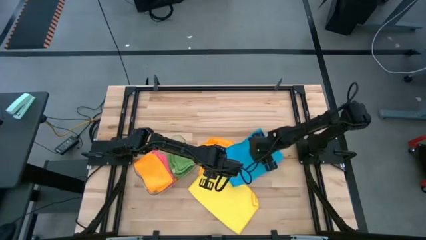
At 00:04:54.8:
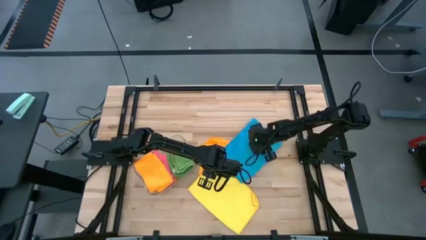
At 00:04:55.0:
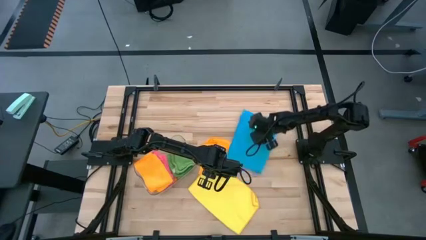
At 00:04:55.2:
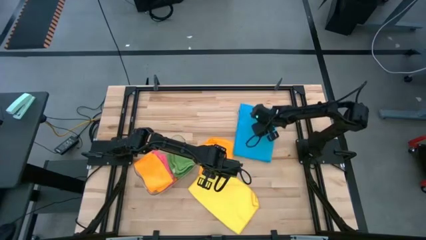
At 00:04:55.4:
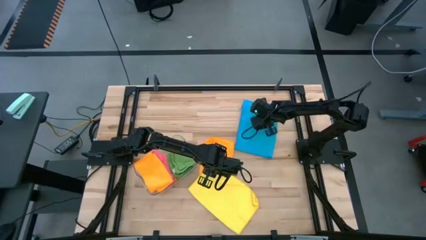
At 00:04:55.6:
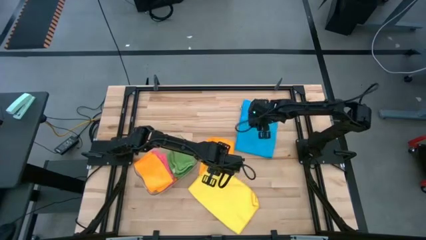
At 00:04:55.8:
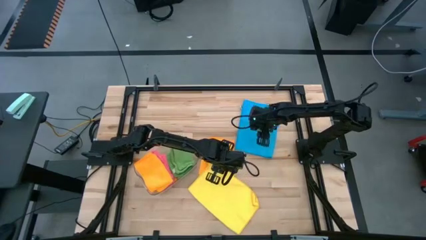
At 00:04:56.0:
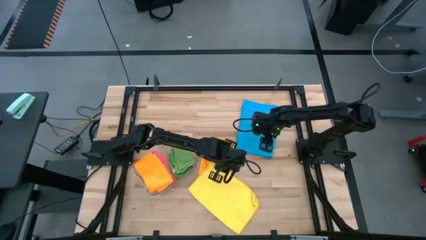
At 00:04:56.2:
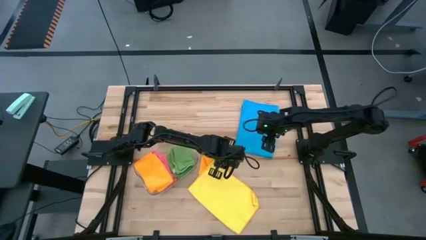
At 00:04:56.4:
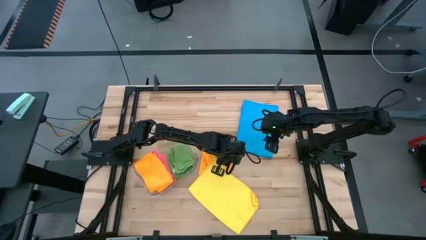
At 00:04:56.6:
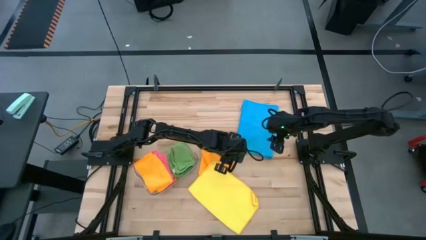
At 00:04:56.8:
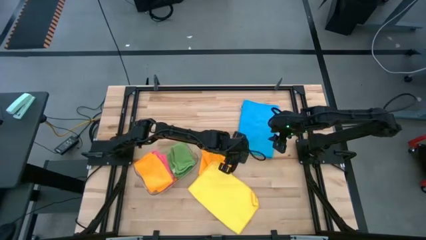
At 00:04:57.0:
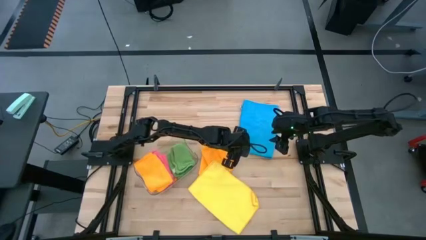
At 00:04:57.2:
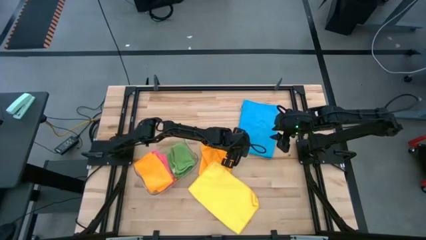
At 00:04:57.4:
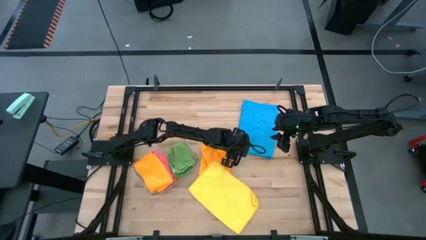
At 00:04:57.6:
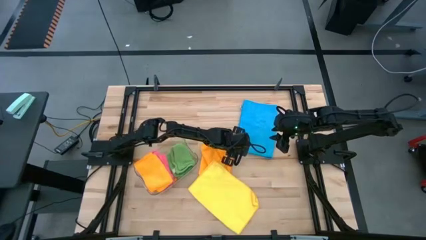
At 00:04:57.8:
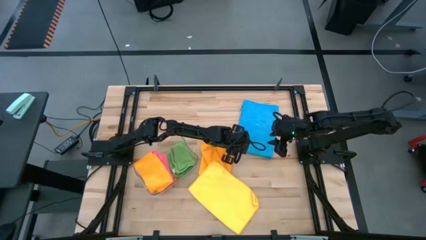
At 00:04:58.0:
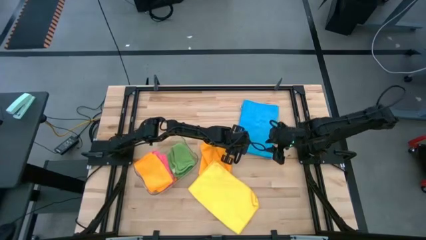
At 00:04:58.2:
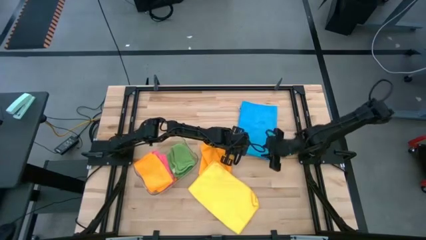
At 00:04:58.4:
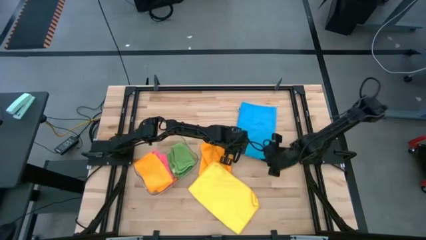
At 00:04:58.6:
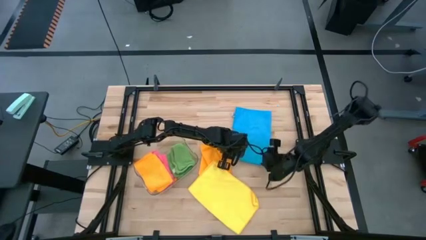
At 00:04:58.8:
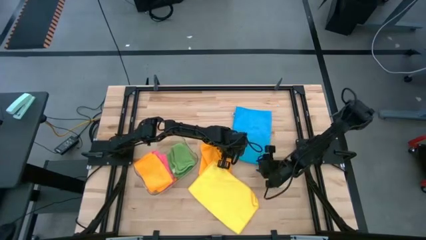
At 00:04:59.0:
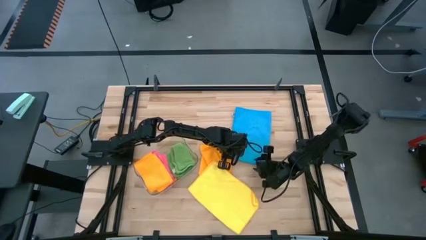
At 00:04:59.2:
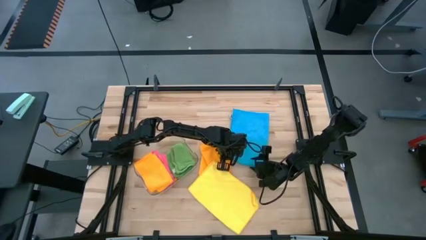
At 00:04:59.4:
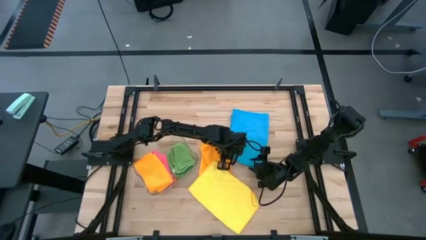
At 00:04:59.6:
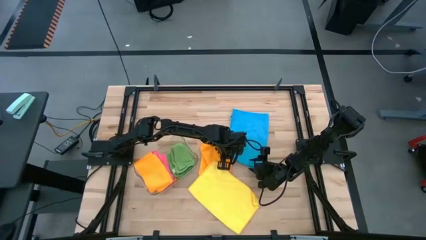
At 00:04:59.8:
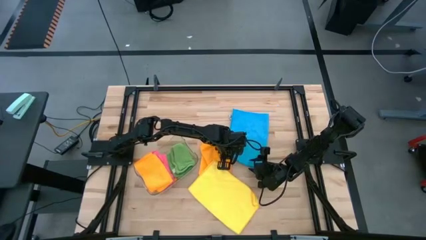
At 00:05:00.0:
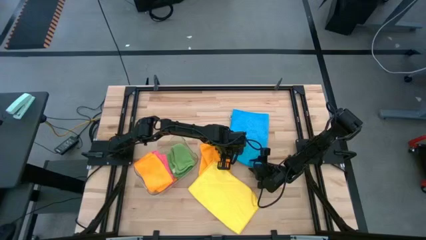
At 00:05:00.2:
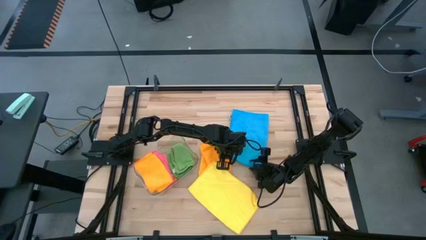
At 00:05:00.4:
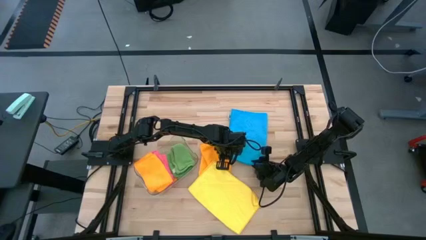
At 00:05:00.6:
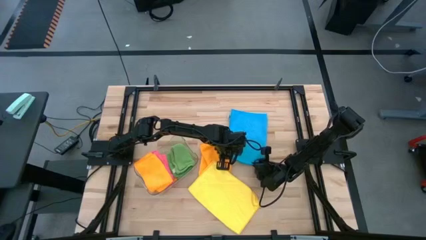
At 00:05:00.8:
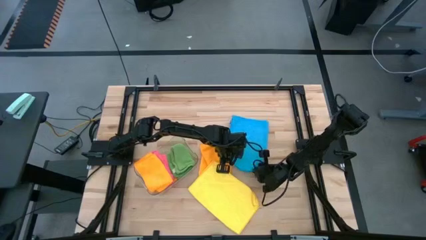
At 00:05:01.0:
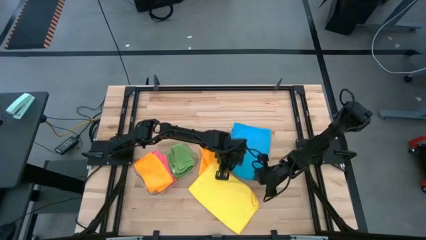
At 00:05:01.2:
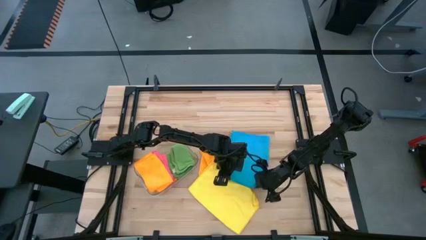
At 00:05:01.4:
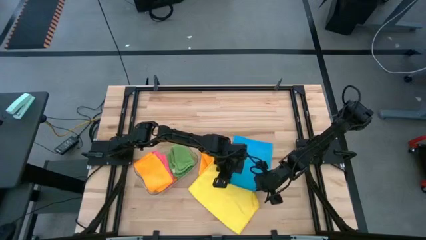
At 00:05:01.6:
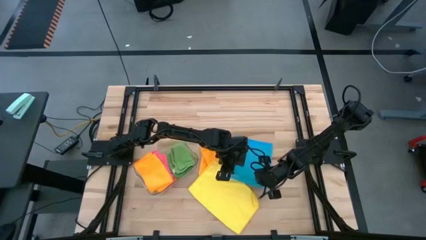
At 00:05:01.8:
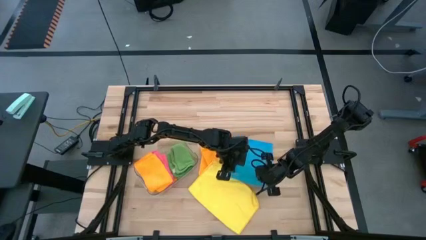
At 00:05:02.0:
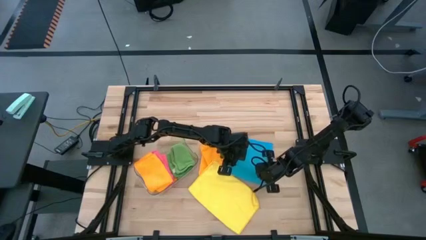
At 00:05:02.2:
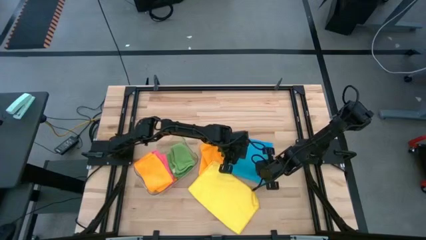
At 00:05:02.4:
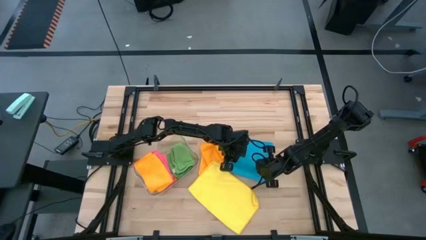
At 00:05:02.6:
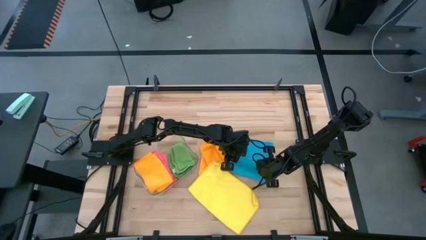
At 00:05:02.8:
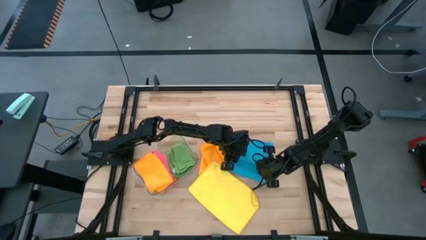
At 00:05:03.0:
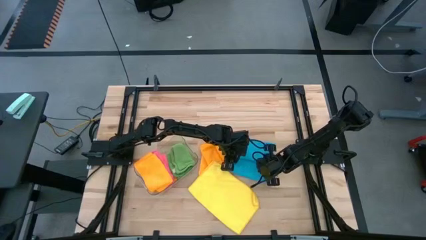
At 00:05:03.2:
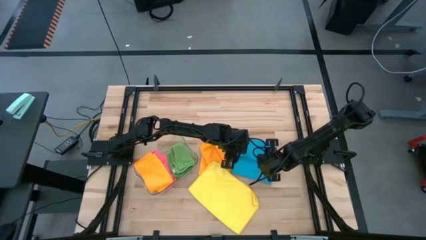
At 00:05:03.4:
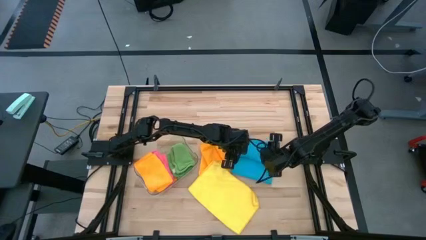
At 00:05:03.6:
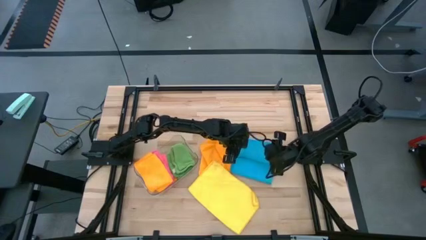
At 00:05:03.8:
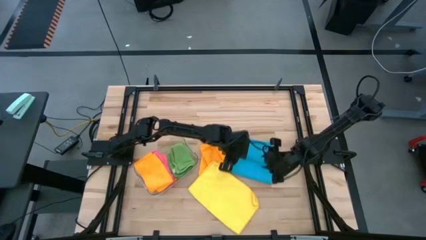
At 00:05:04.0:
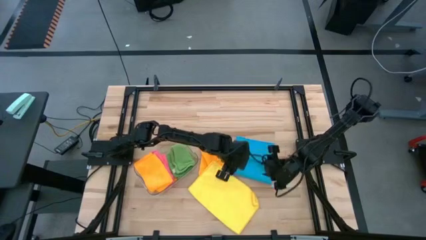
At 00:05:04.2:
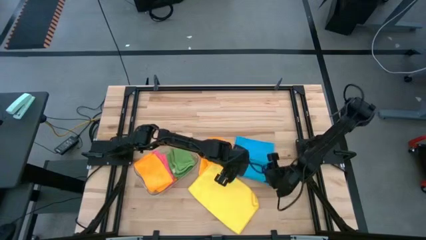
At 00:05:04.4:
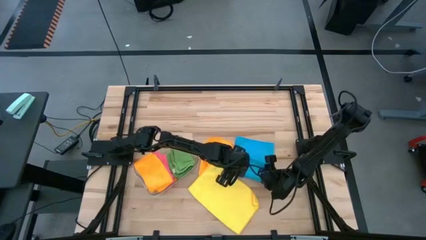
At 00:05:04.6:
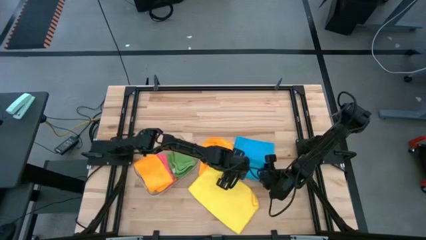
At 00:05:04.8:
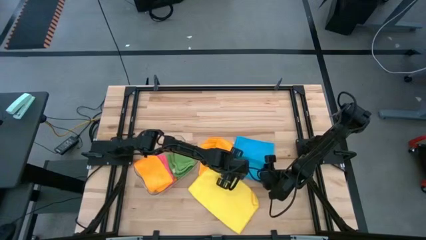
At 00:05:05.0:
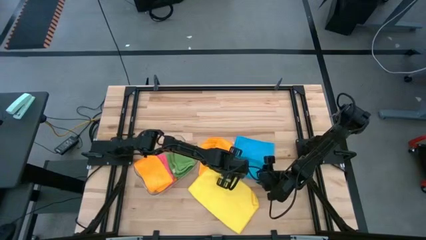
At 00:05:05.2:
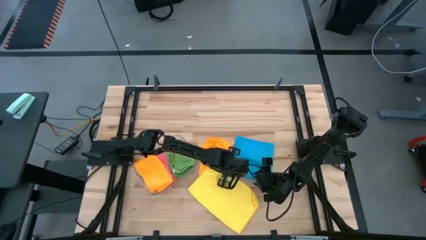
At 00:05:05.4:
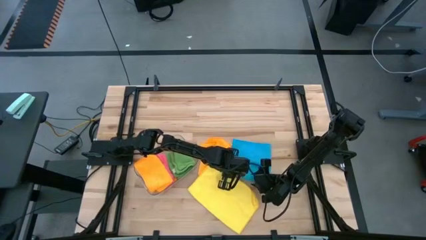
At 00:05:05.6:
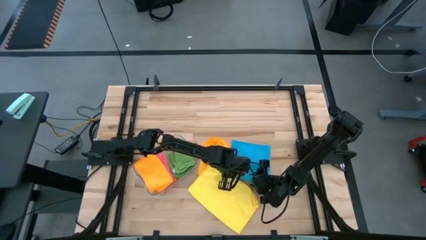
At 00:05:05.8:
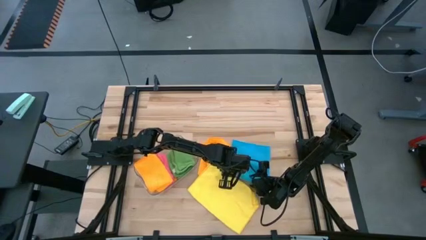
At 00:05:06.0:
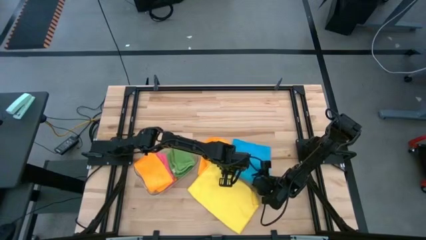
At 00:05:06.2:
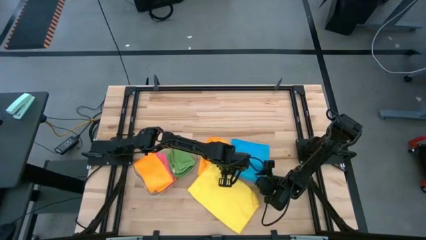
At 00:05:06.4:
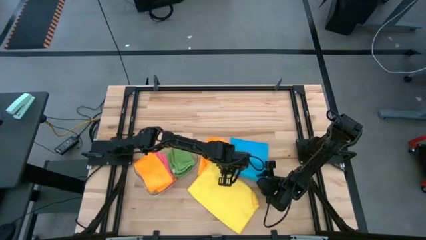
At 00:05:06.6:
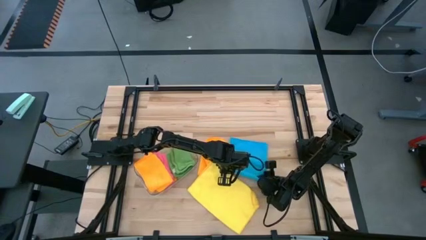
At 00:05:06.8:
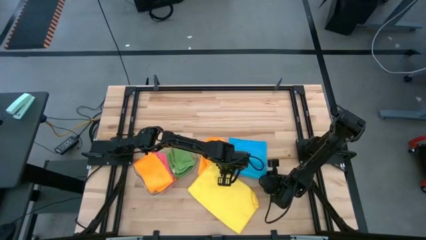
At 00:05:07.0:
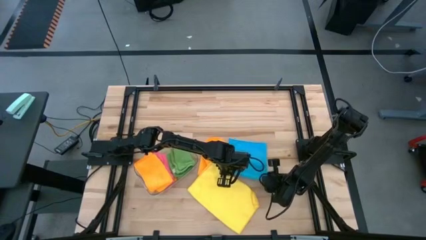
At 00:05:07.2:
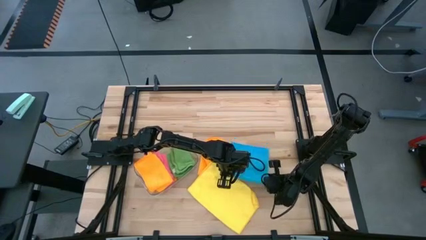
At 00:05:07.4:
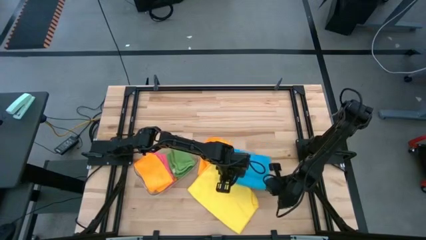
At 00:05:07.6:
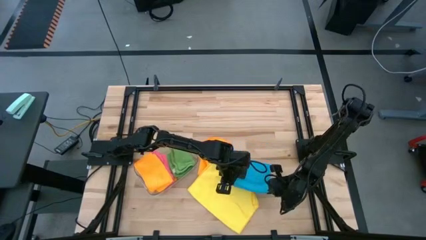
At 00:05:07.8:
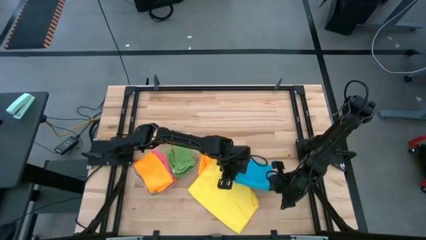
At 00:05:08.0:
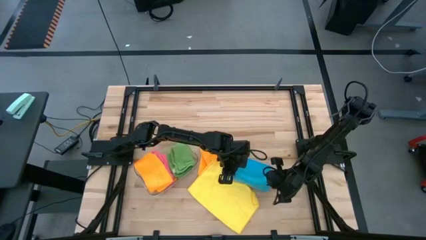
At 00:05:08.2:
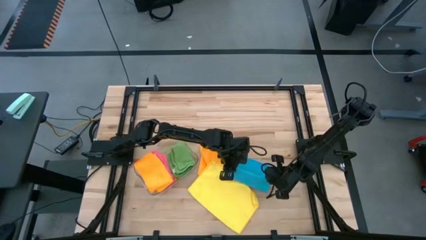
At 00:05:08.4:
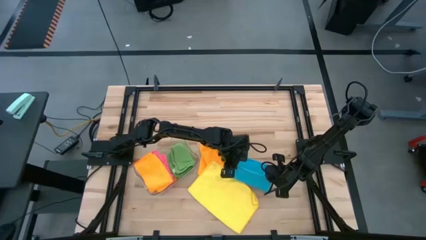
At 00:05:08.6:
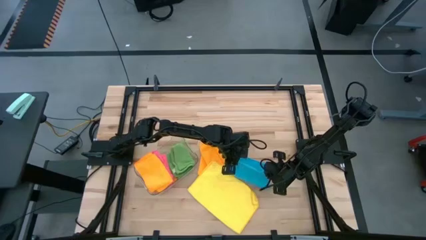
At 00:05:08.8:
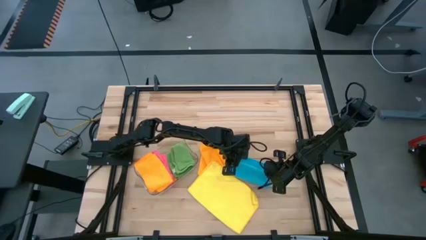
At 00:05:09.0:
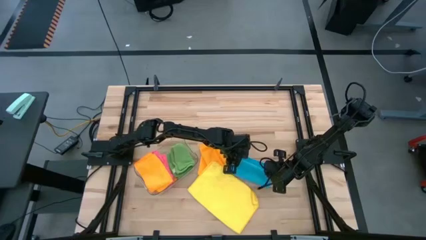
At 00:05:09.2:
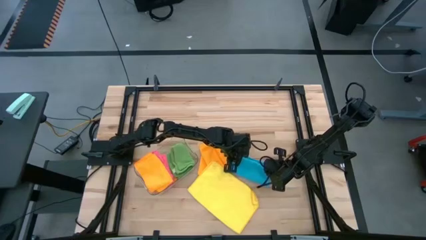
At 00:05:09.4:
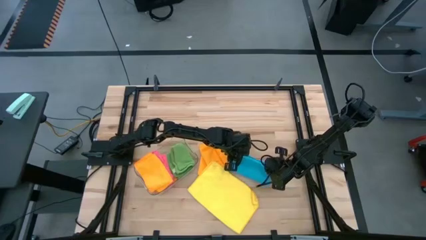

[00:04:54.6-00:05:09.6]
Task: Fold microfiber towels
Fold the blue microfiber cloth
